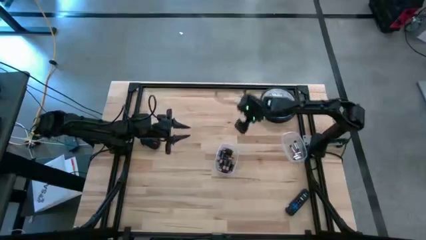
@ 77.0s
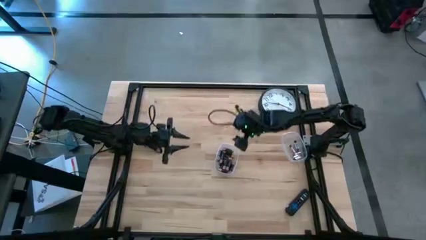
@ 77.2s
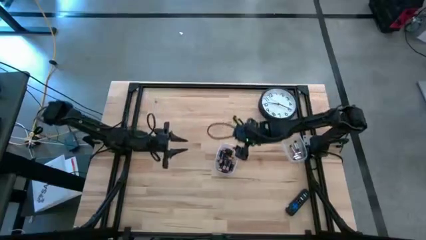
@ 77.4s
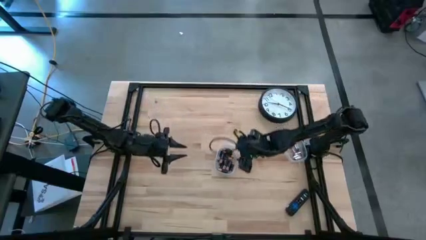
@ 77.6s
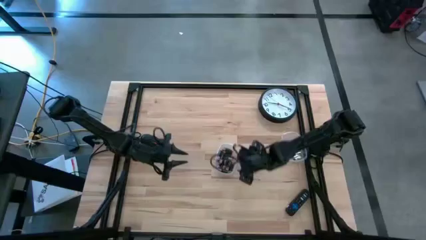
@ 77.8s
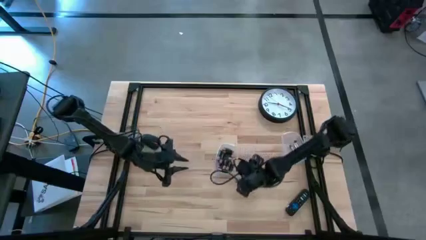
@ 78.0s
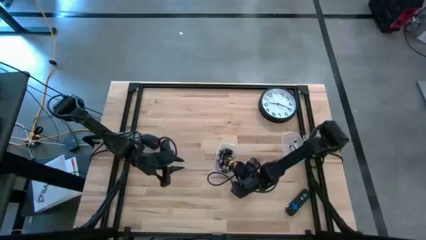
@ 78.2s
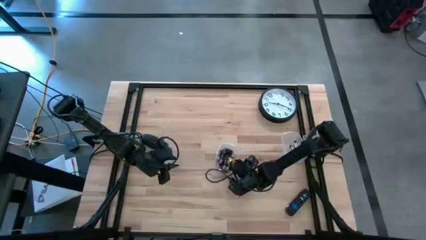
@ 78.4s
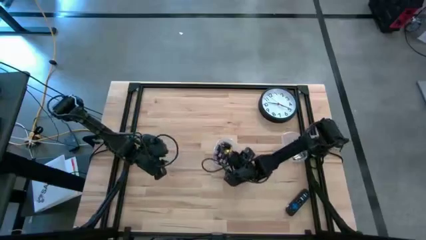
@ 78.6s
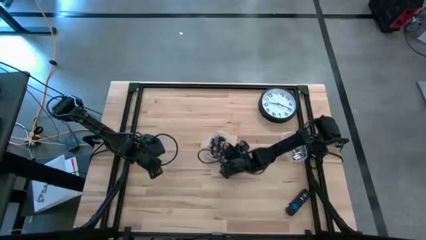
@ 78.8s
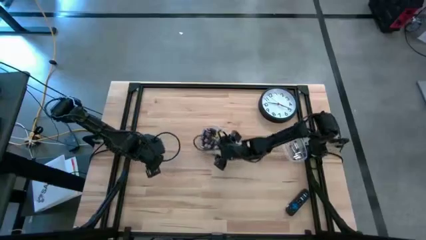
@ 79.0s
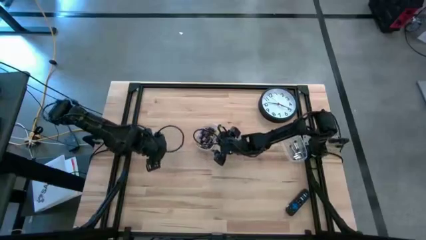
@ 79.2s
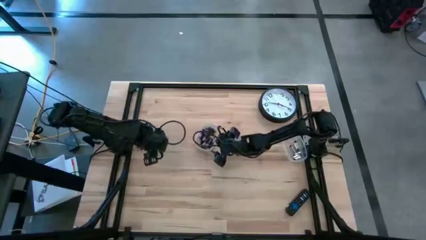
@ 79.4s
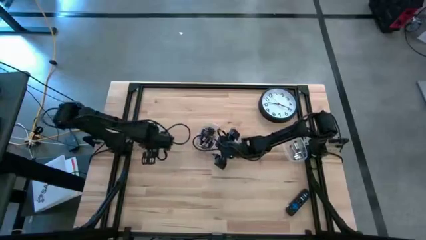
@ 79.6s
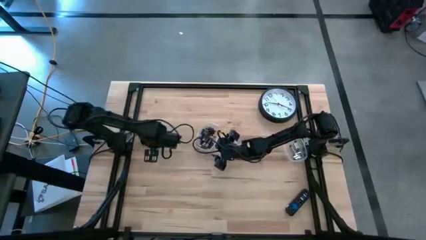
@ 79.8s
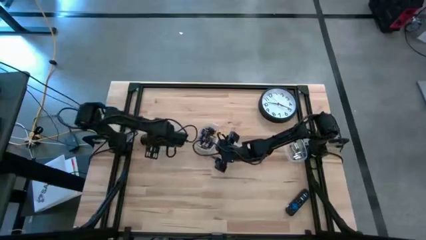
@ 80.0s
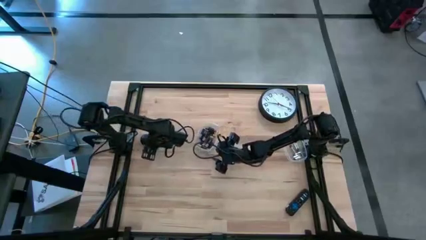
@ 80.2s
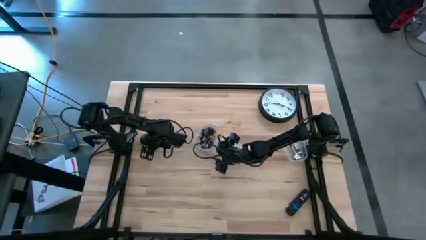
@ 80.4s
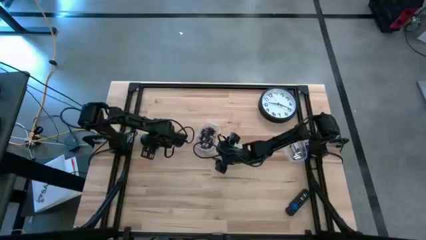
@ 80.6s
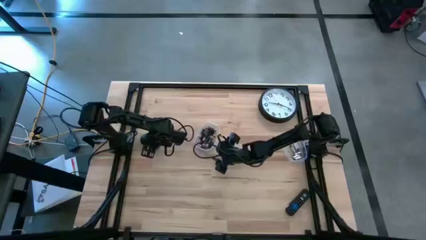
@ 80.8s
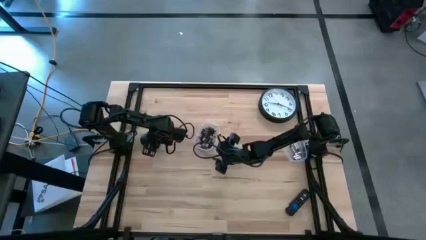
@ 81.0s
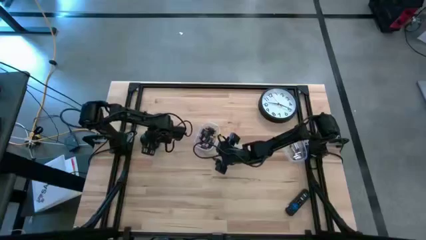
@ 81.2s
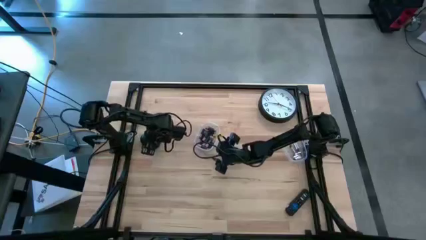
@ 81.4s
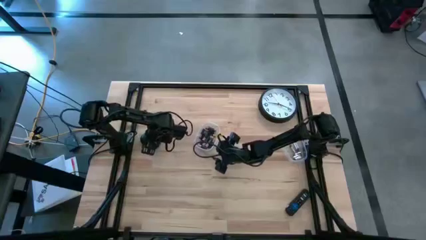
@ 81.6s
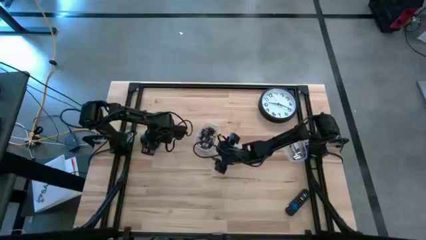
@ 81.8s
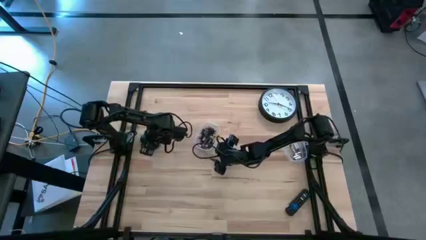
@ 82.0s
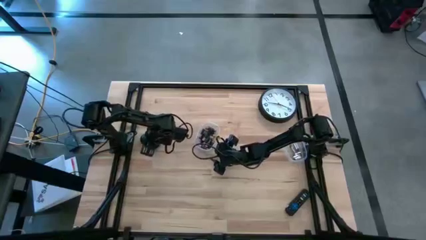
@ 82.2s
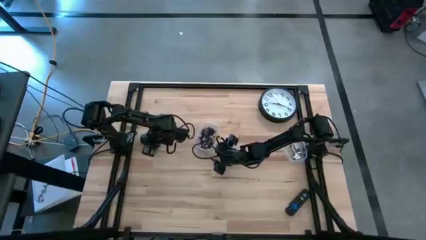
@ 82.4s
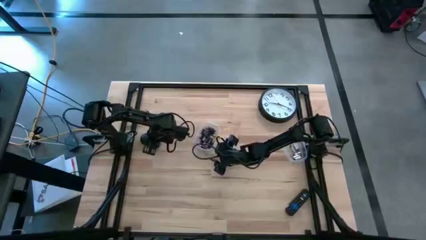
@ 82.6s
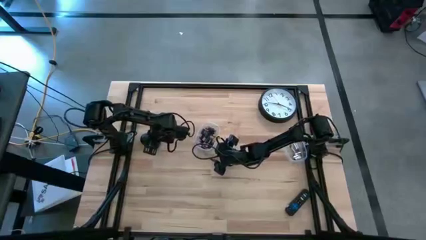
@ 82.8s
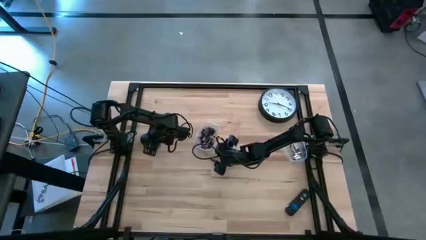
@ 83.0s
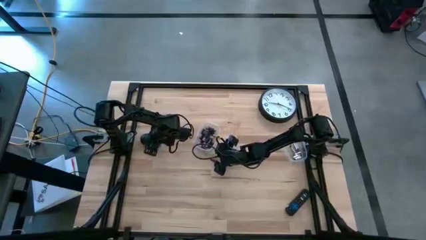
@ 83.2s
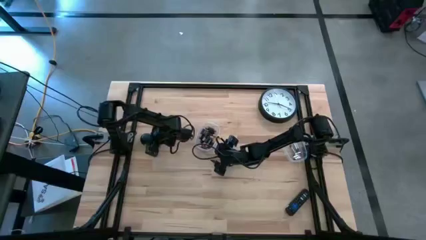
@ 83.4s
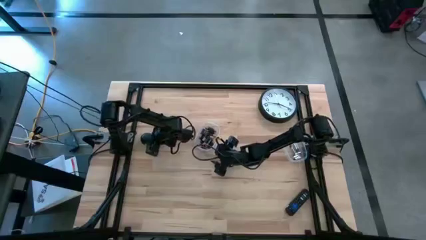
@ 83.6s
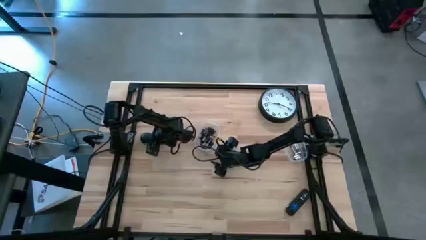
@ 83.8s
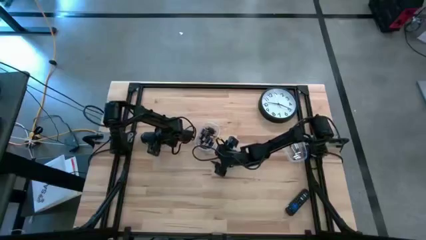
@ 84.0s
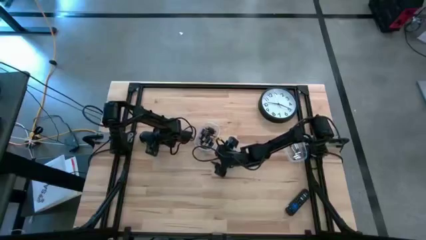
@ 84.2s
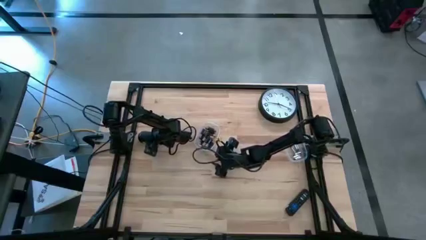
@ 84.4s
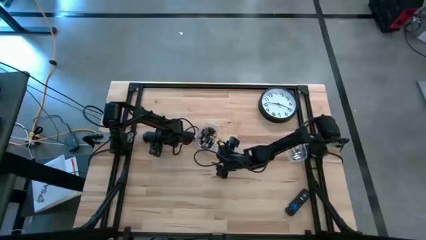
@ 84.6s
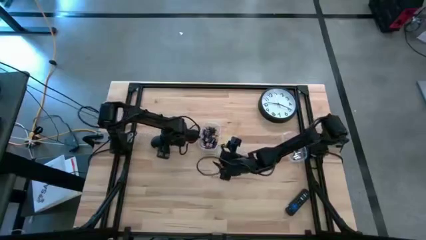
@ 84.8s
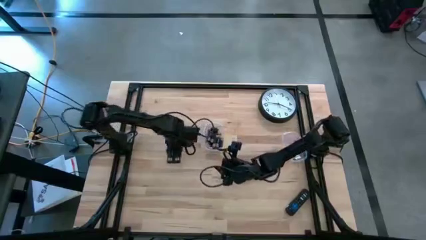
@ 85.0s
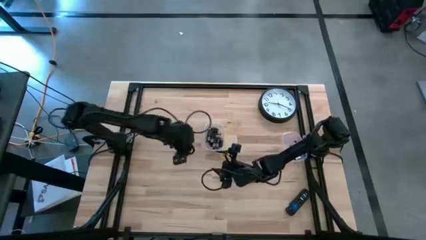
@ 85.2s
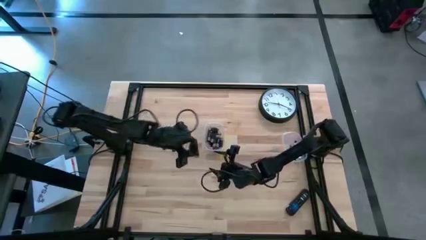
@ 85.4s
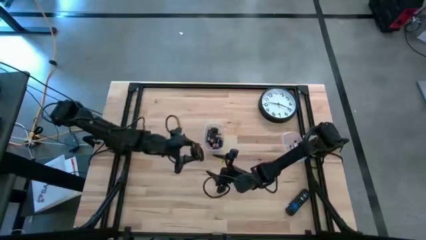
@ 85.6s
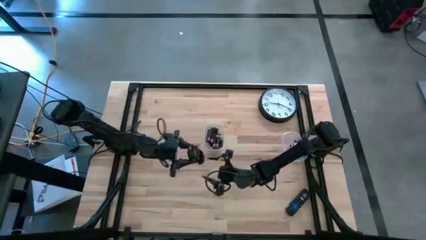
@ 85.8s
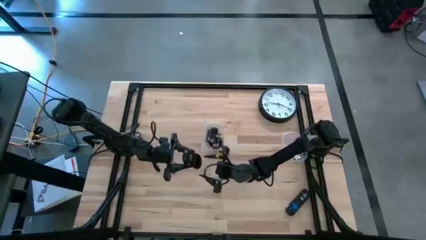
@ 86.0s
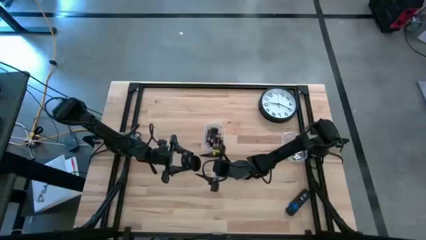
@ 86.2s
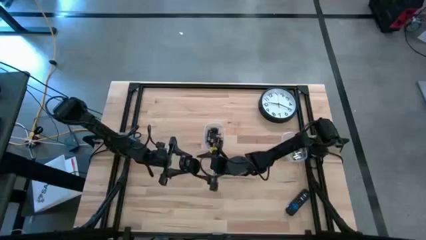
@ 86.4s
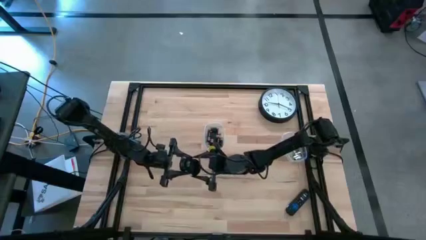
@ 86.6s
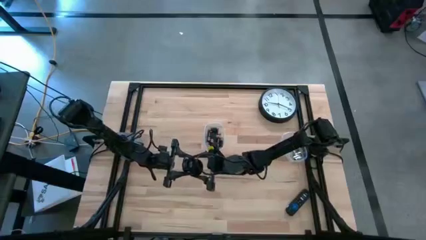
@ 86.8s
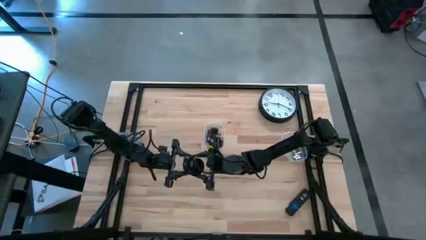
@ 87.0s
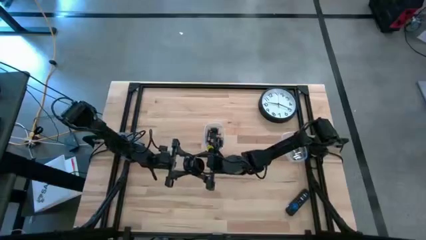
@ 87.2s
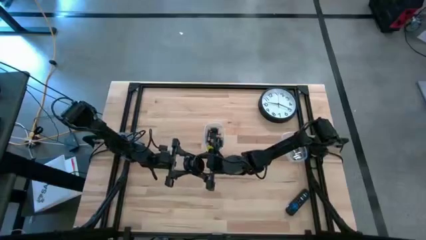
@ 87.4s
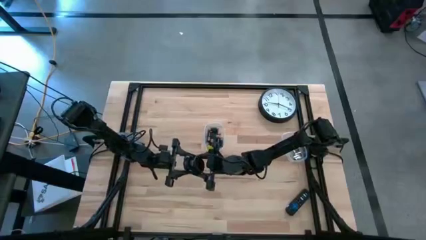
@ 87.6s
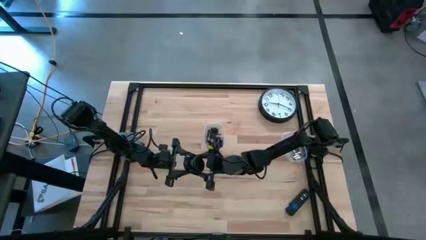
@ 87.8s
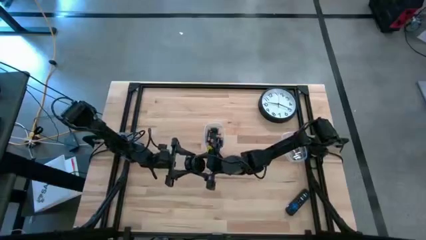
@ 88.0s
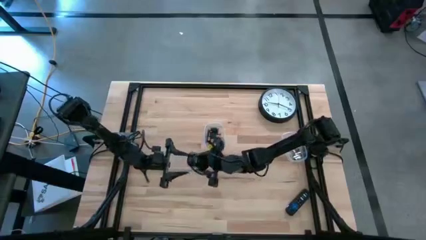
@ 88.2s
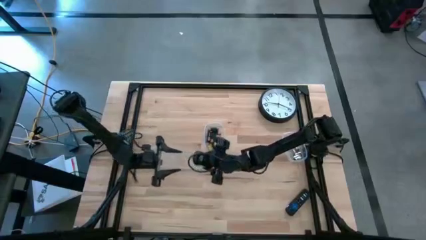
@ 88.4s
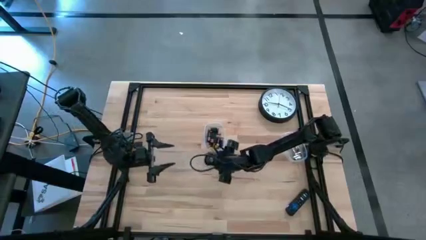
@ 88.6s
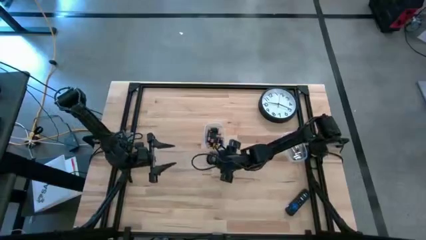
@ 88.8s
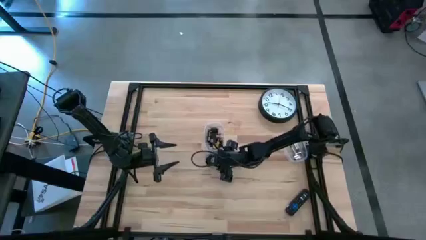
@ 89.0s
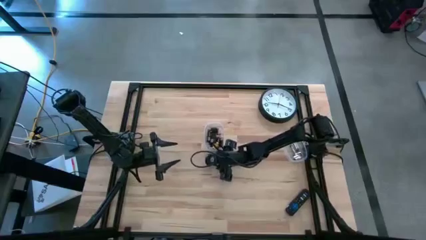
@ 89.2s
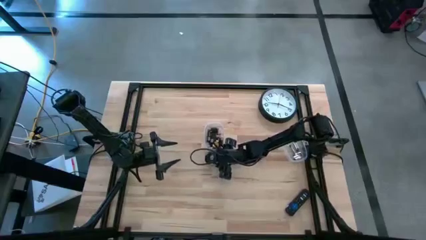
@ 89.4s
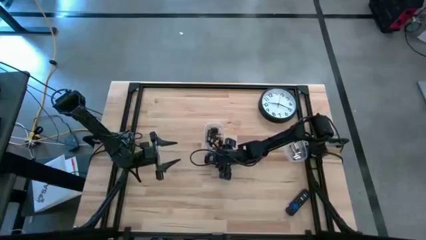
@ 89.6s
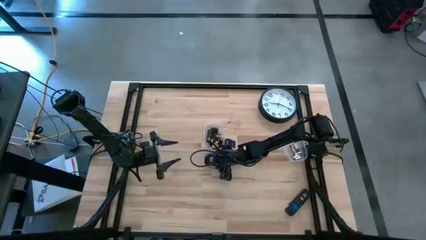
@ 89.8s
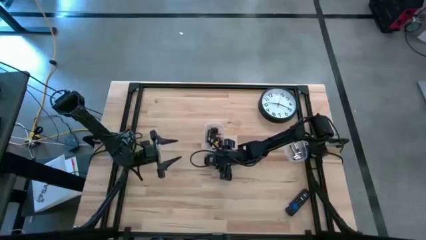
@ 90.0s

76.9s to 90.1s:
Task: Insert battery
Insert the brown battery into the mouse's battery compartment

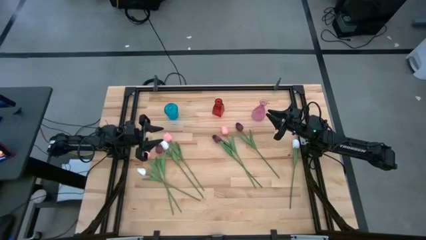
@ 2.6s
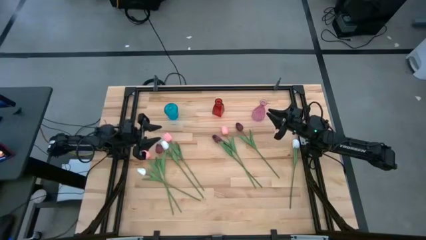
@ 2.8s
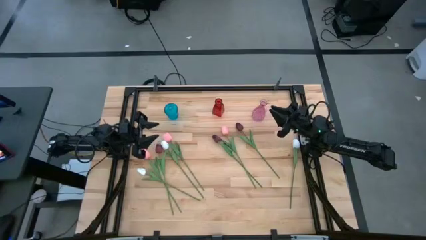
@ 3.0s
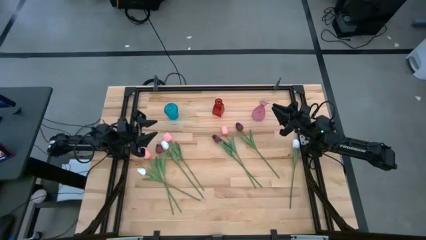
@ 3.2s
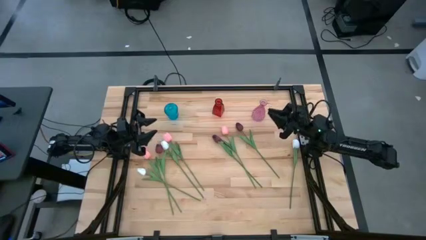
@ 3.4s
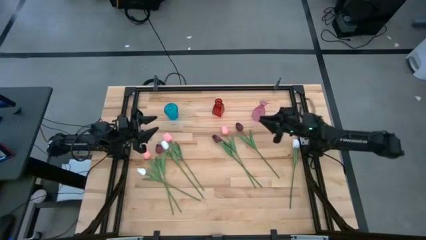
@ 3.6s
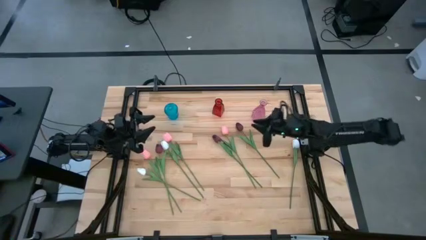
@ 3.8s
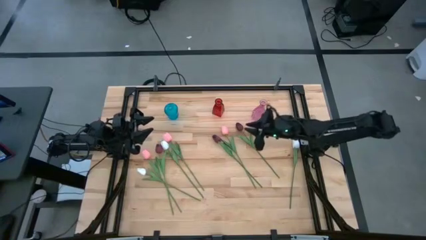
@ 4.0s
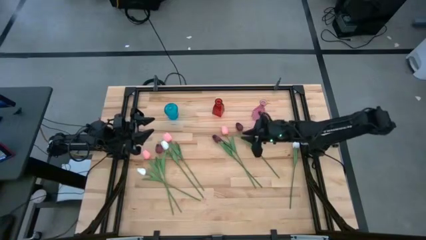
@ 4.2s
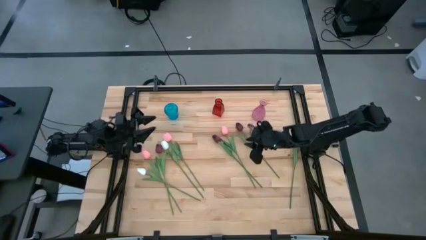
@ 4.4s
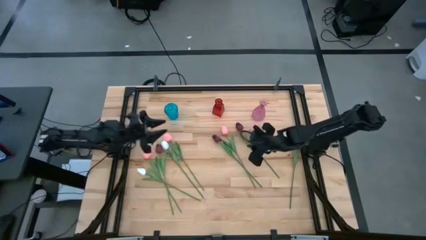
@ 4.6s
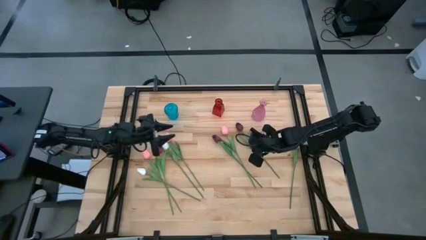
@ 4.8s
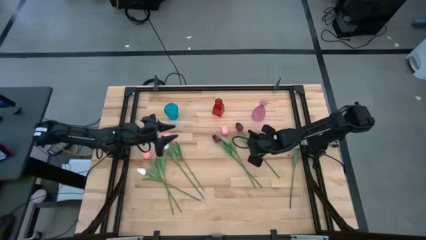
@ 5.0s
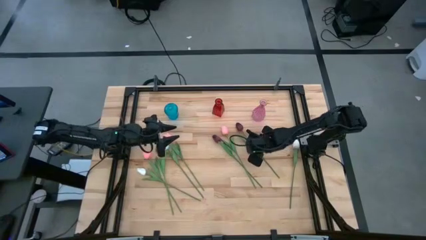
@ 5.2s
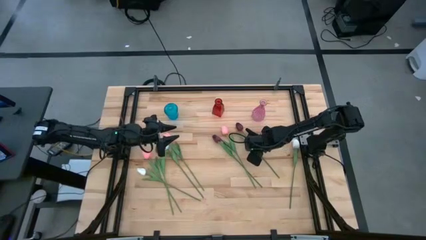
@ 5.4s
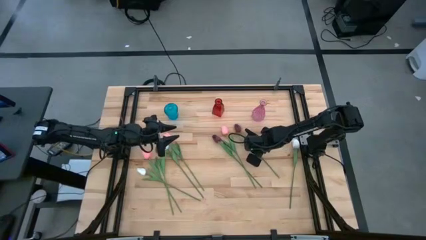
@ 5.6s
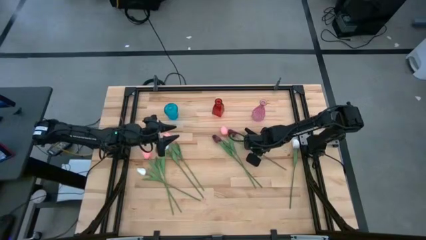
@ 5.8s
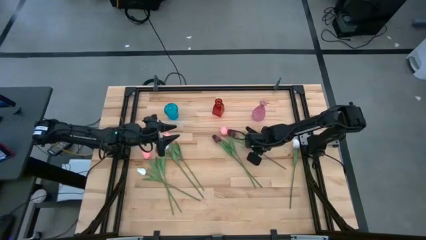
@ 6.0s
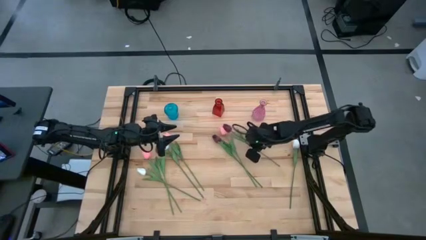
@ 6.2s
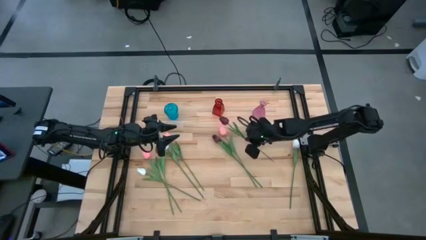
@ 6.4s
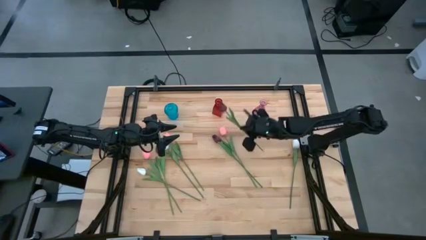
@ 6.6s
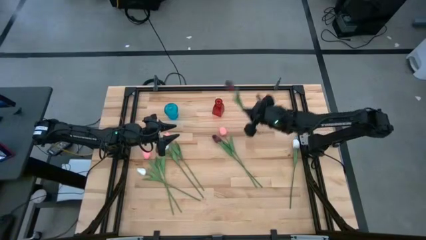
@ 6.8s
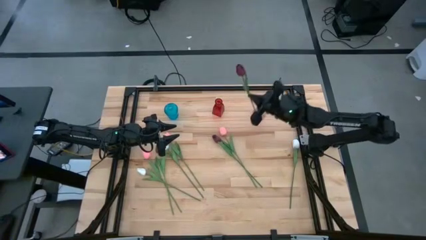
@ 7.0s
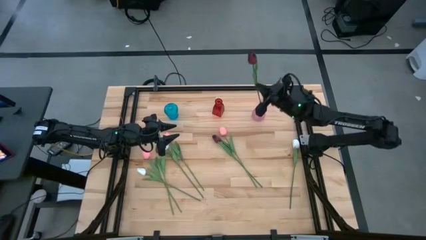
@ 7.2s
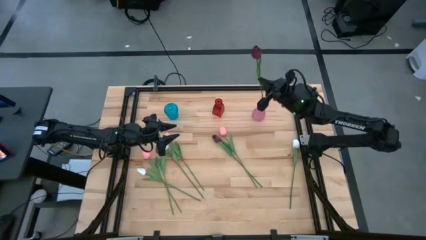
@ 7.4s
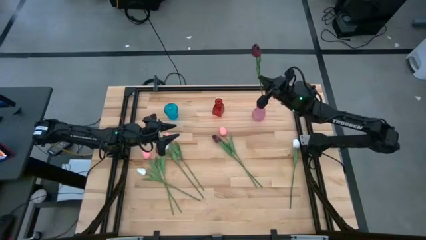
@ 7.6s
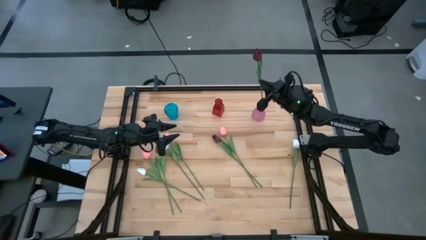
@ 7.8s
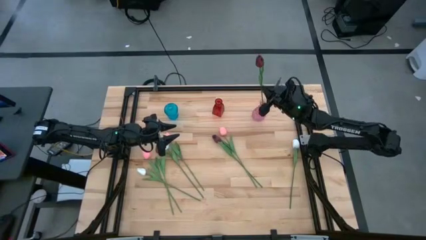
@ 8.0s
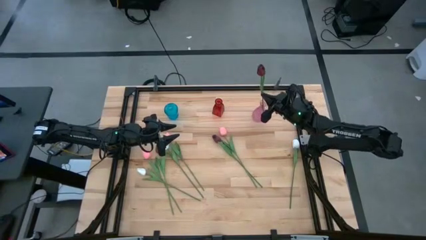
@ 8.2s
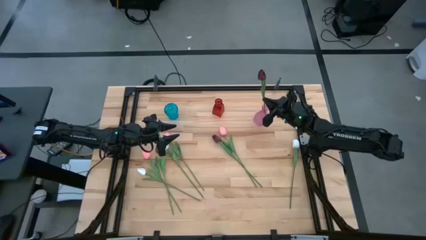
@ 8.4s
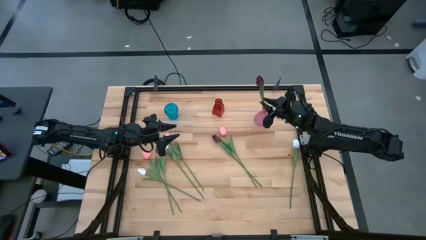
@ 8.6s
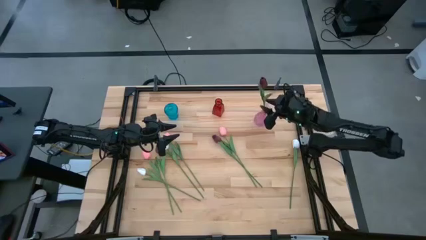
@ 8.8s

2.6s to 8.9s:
Task: Sort flowers into vase by color
Put the right red flower into the pink vase
